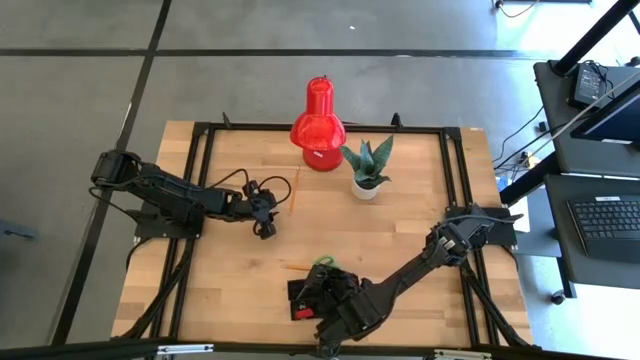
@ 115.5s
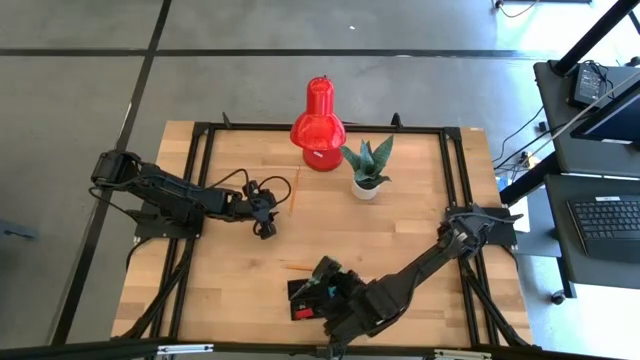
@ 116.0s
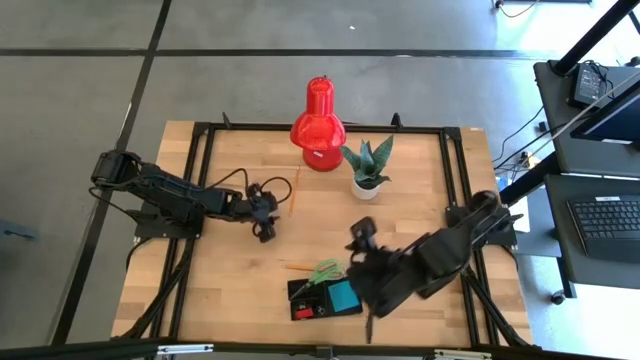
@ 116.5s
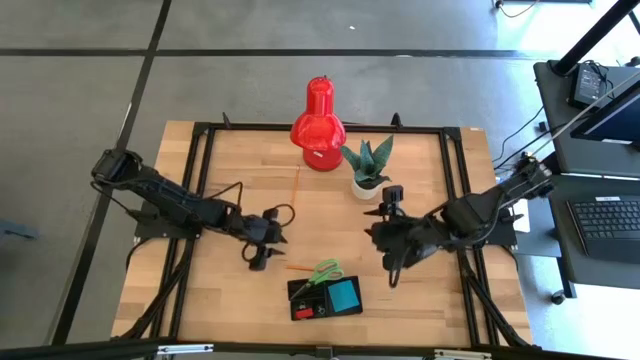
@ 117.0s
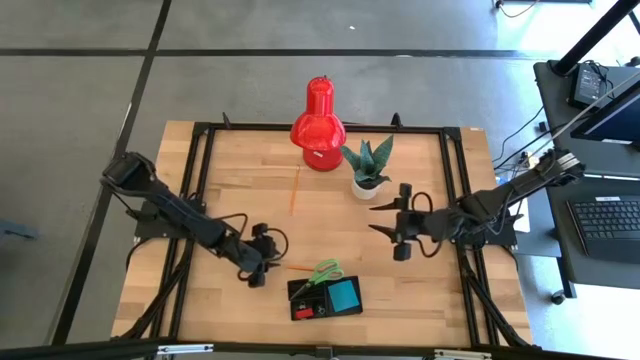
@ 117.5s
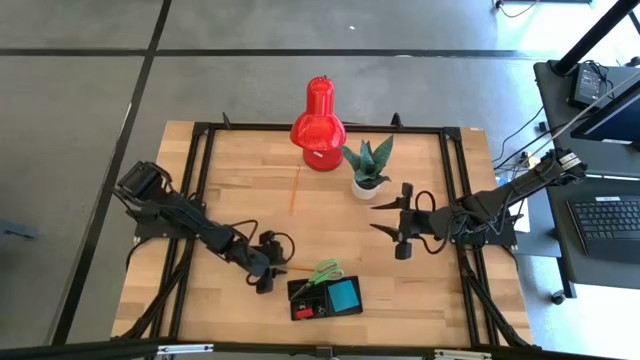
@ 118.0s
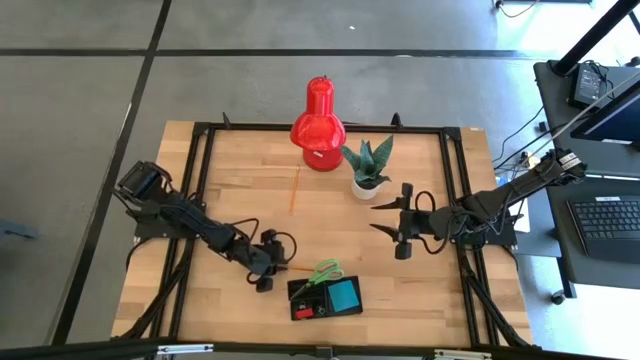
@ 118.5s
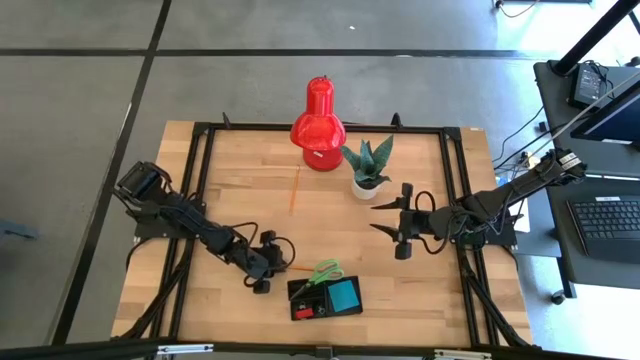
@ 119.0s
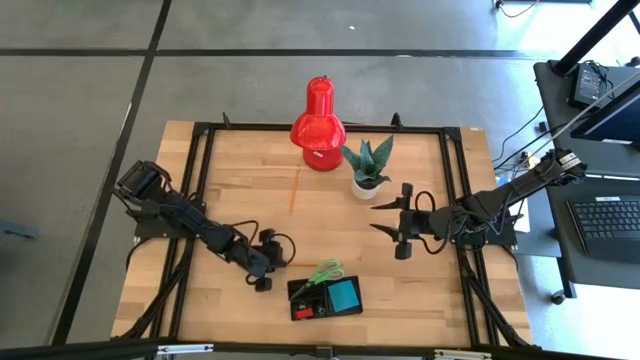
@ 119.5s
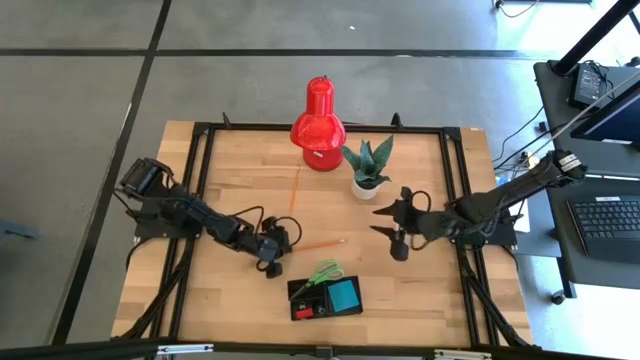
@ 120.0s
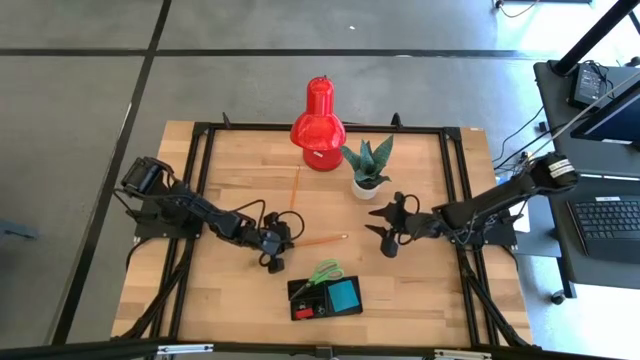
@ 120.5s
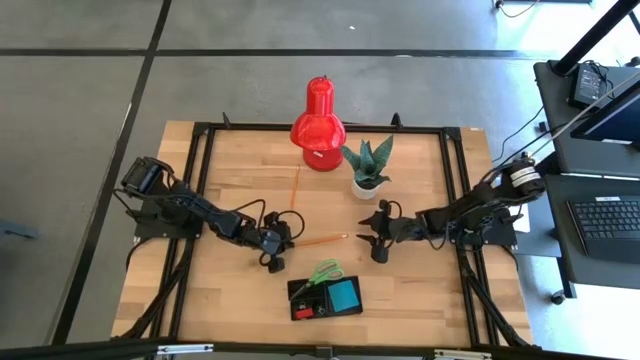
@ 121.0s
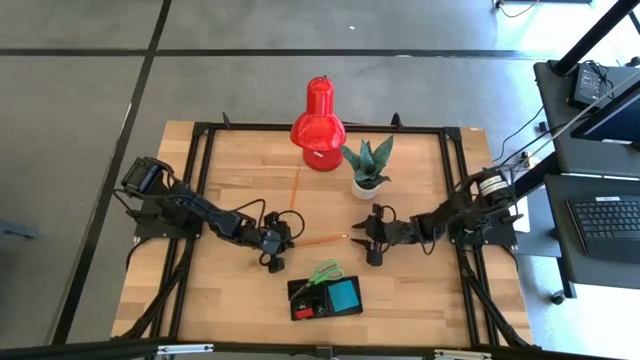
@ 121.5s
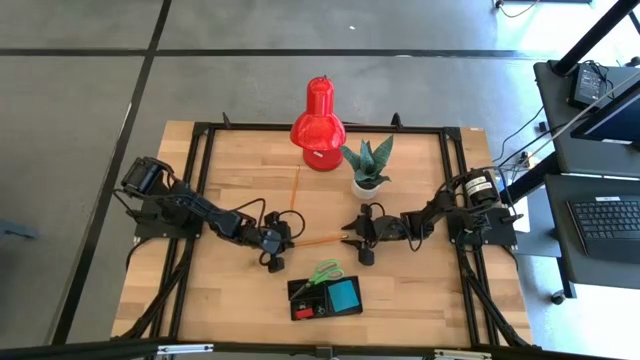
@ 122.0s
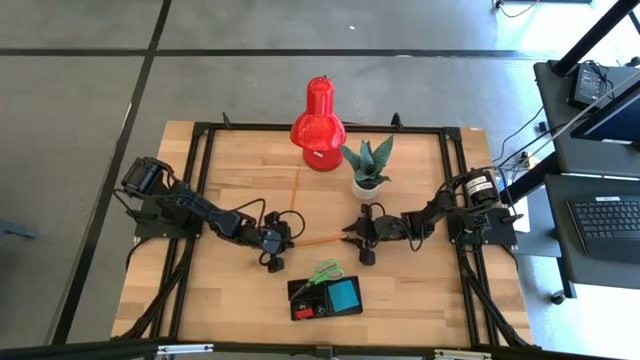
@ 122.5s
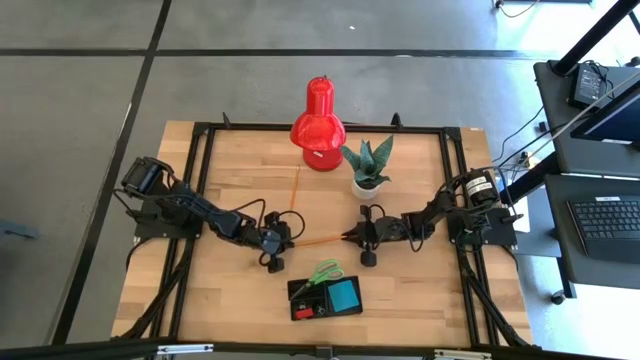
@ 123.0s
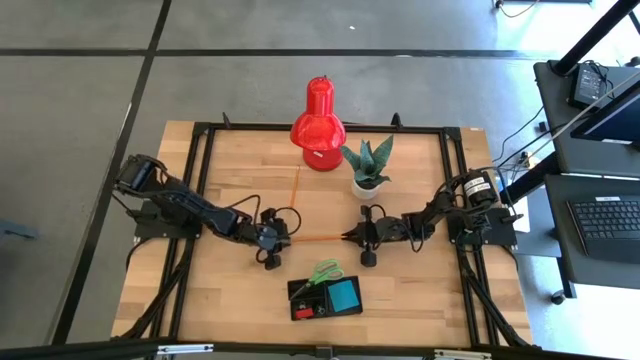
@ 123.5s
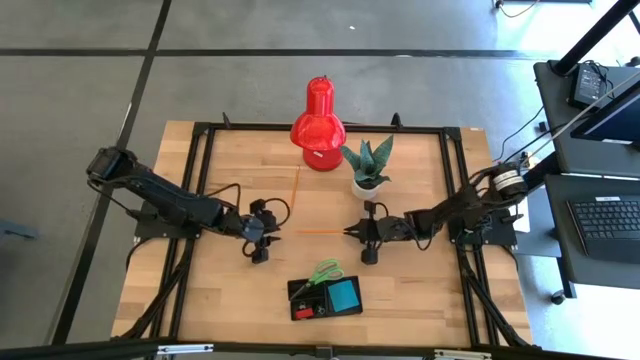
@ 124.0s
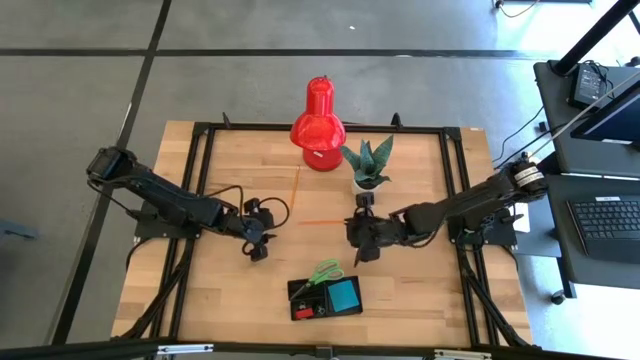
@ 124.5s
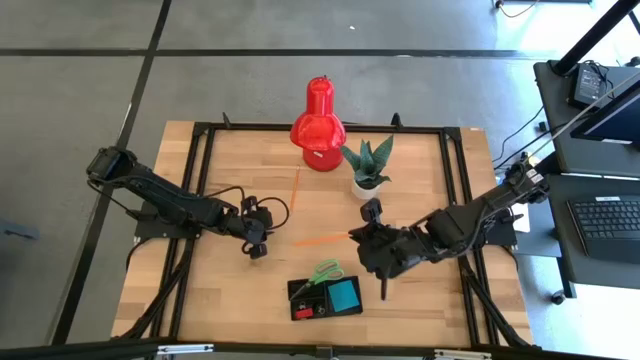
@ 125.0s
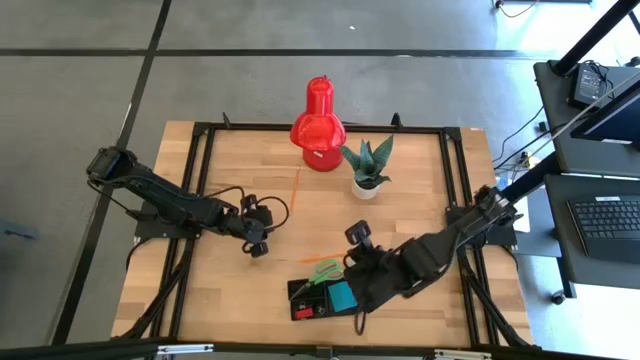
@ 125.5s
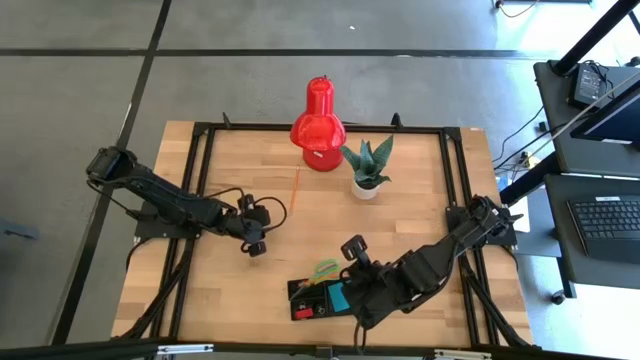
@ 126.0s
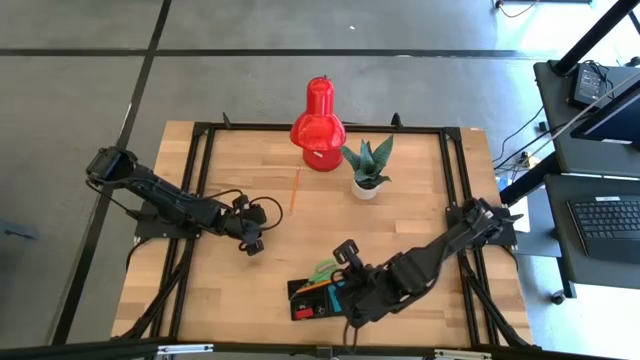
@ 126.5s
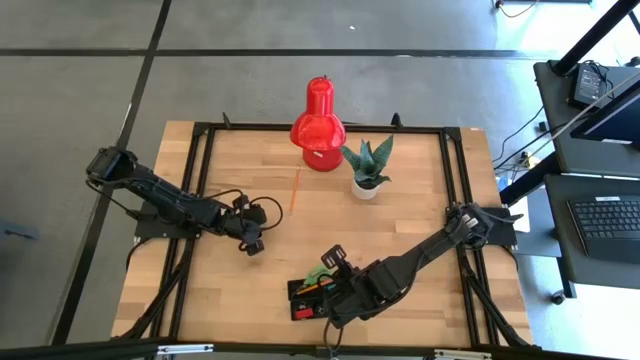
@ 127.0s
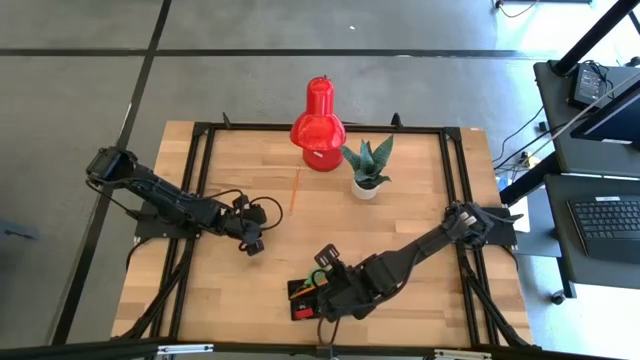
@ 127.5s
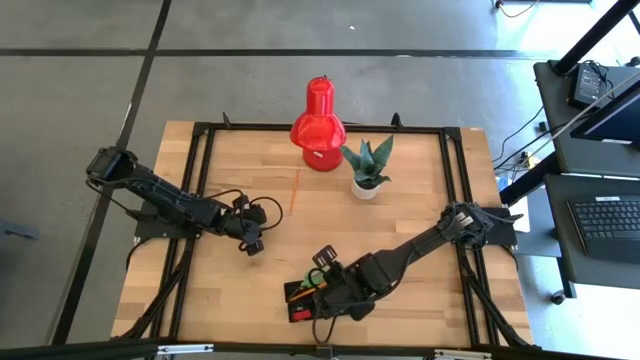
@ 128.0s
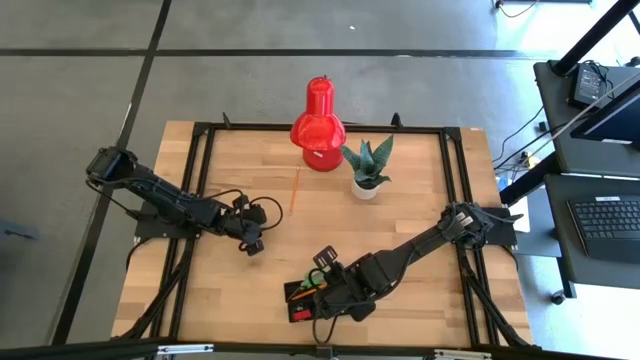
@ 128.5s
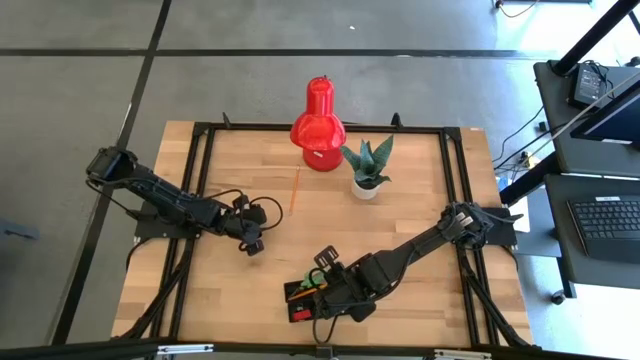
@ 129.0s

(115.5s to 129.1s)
Task: Pick and place office supplies into organizer
Put the bottom yellow pencil into the desk organizer

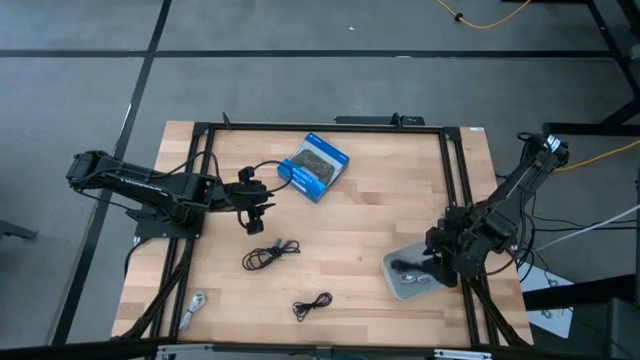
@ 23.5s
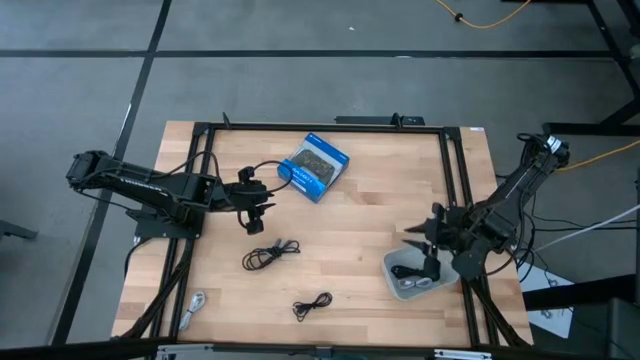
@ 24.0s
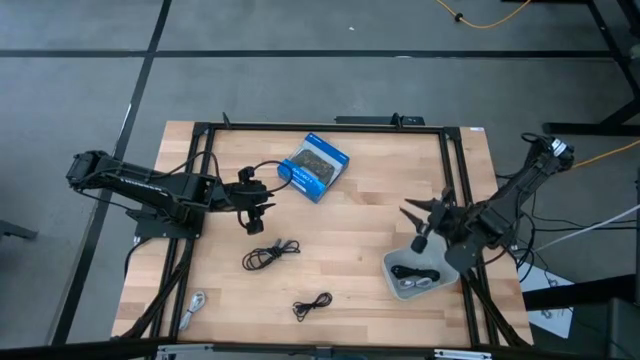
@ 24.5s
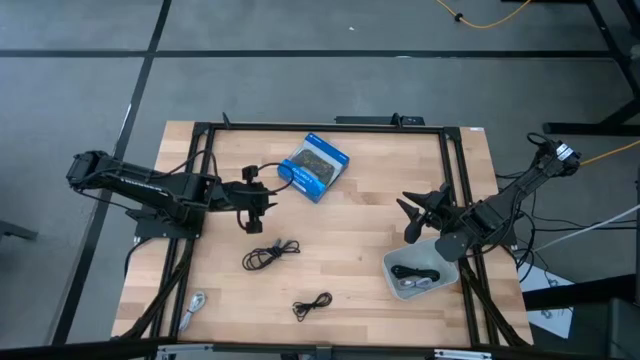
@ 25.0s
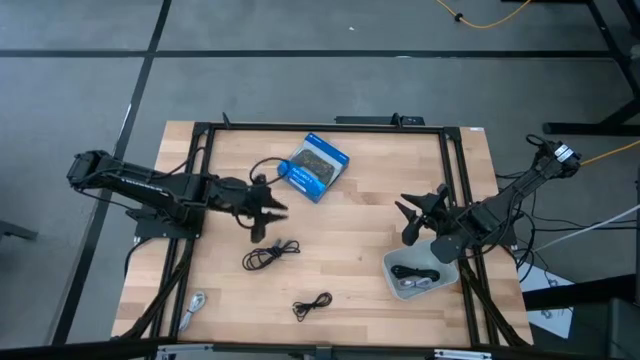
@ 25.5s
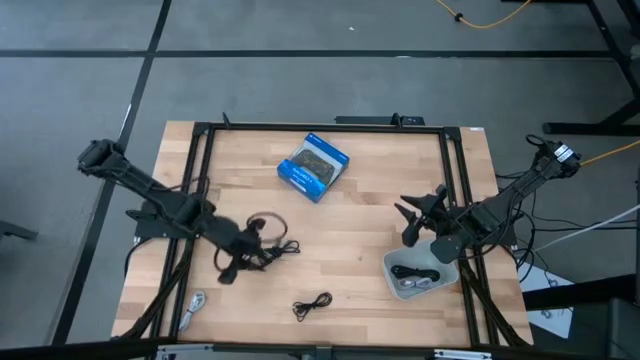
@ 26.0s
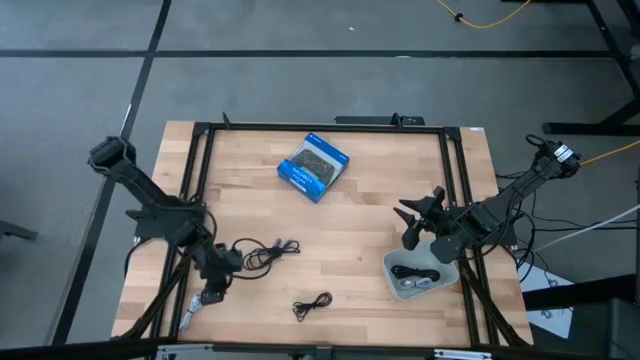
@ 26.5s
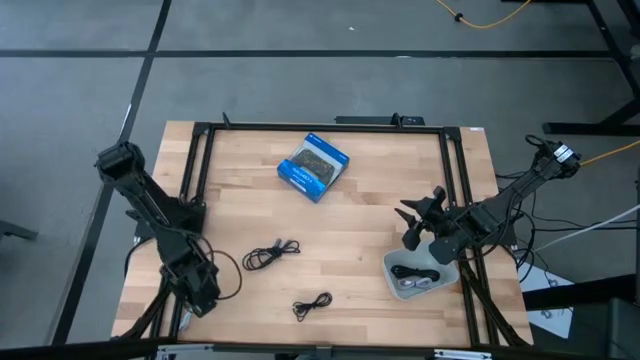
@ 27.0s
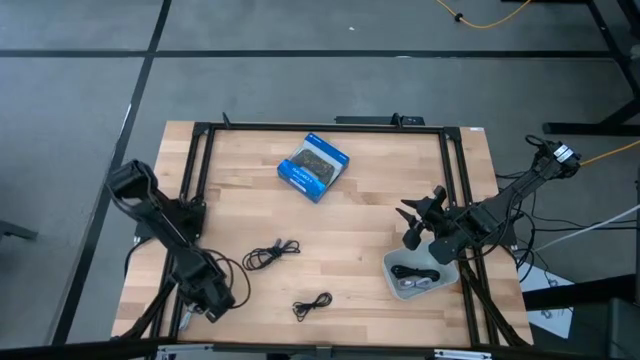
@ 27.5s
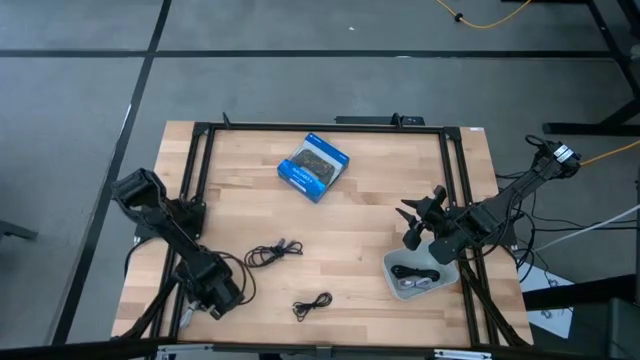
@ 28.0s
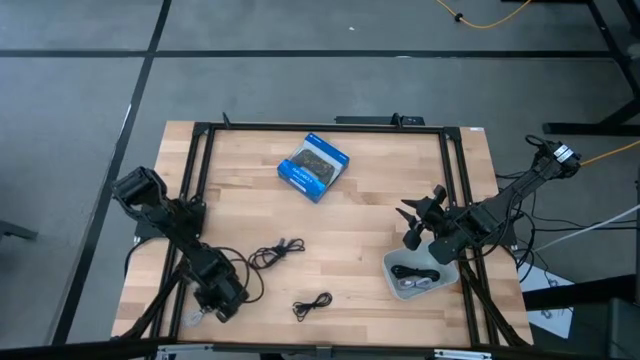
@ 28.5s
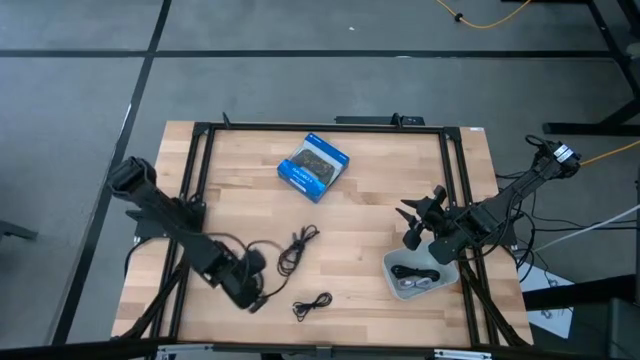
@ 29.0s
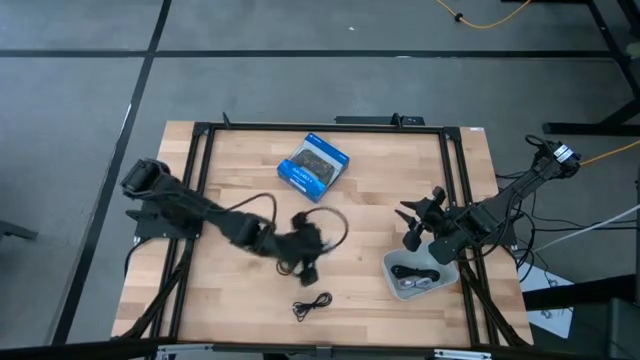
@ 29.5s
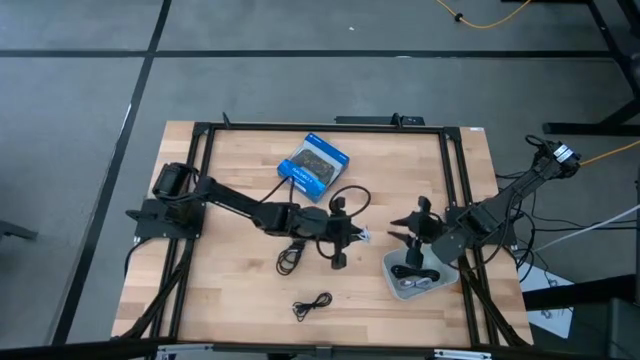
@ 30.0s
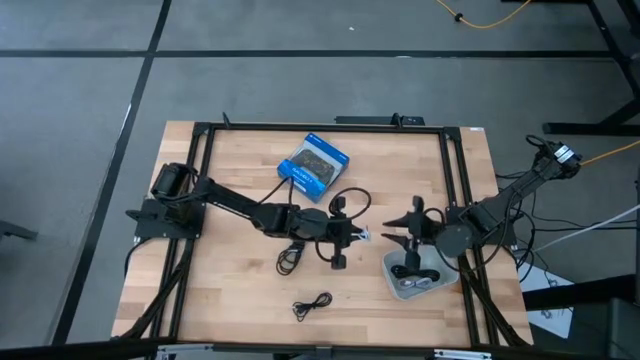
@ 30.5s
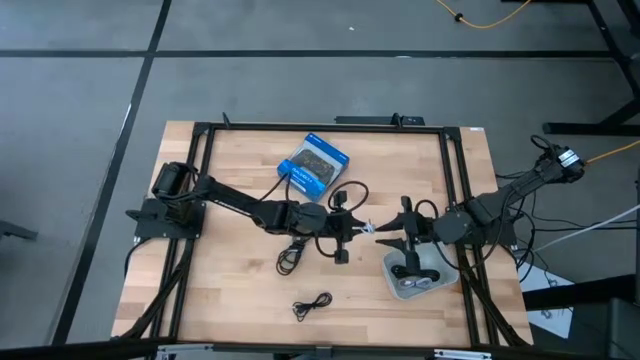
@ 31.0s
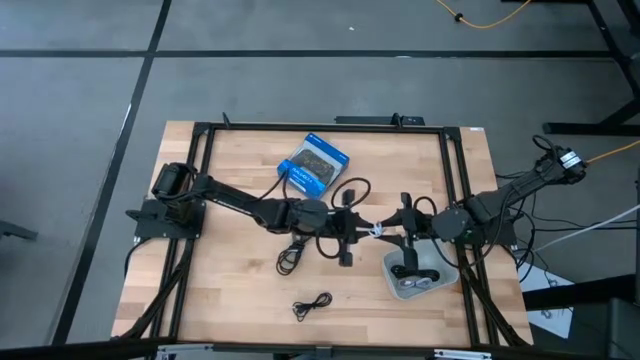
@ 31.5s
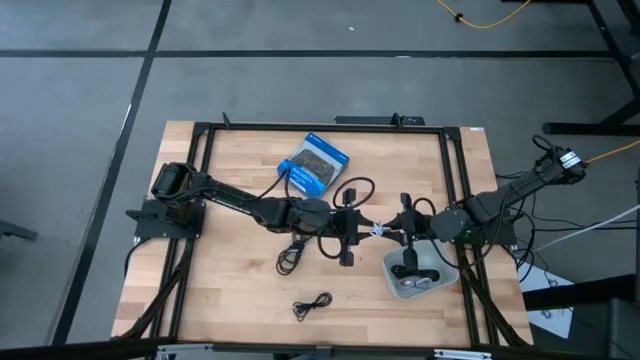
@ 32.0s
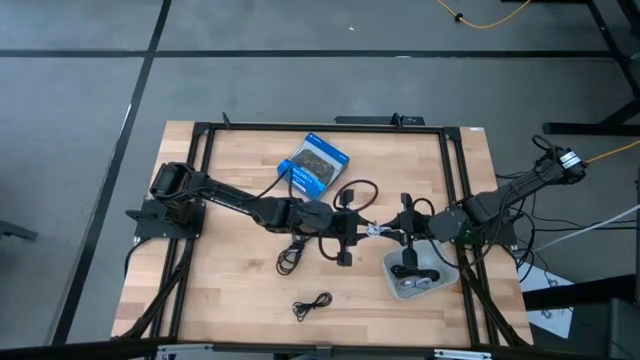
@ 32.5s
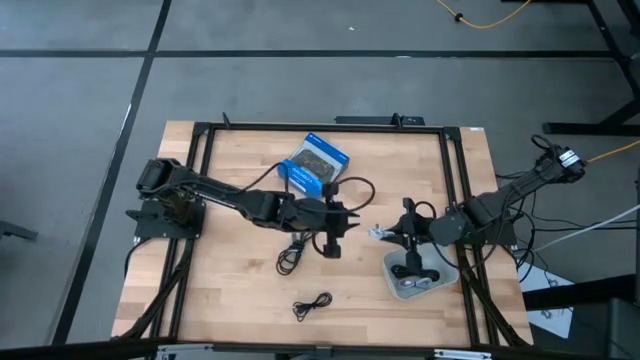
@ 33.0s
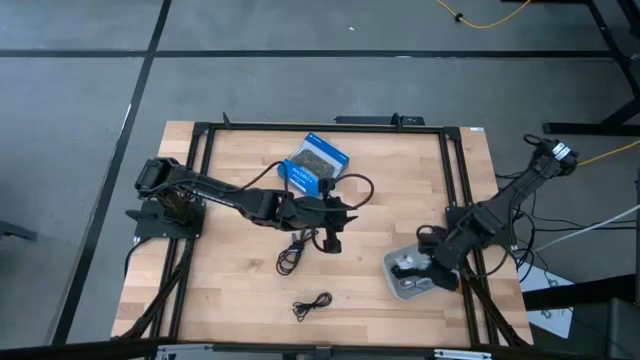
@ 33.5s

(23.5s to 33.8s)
Task: Pick and place USB-C Cables
Put the white charger cable into the gray bin
